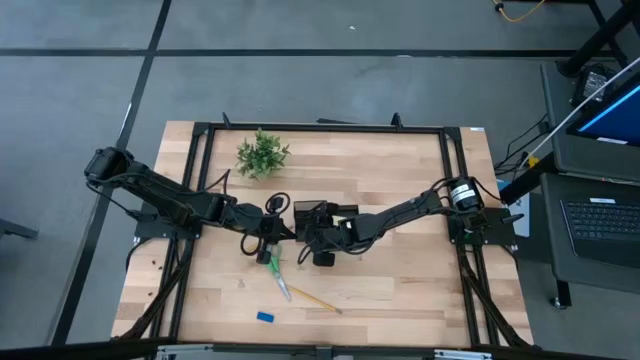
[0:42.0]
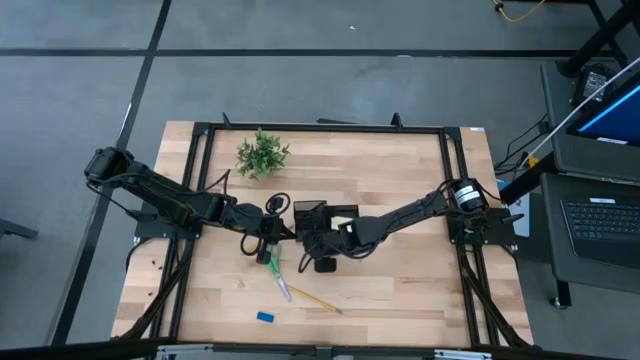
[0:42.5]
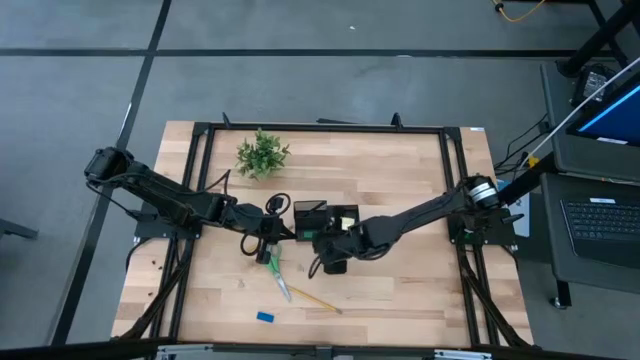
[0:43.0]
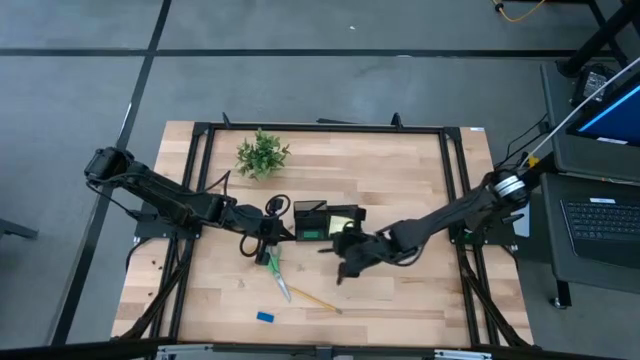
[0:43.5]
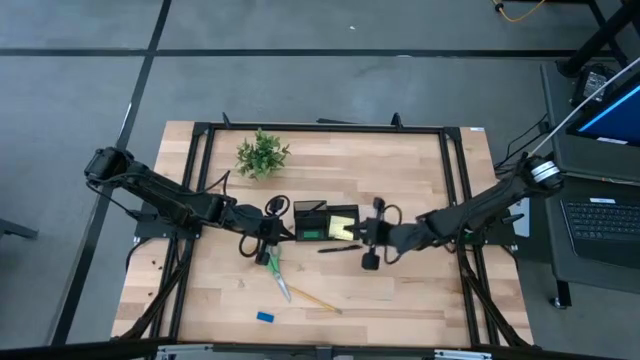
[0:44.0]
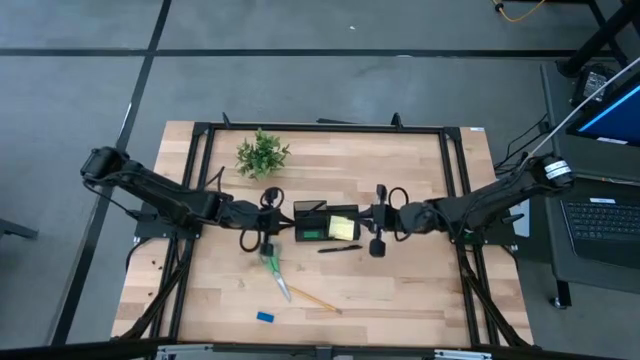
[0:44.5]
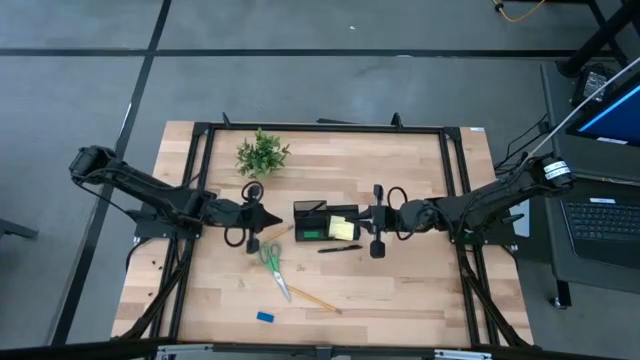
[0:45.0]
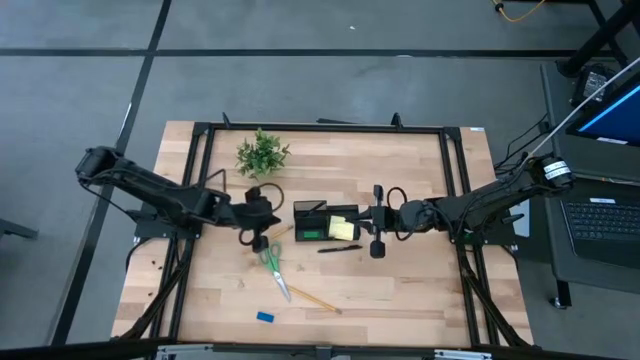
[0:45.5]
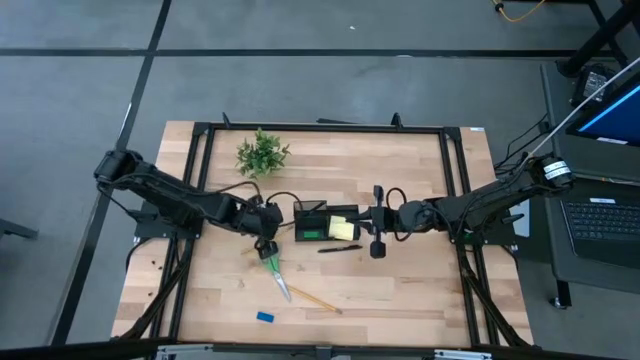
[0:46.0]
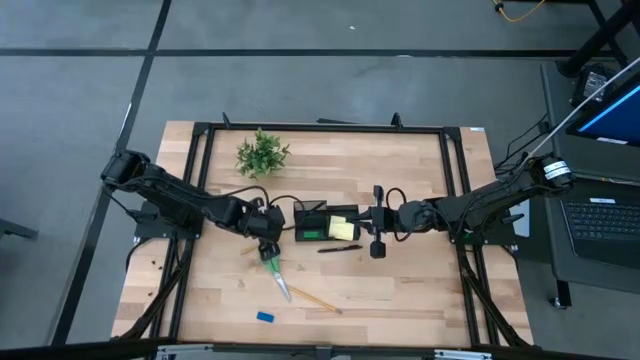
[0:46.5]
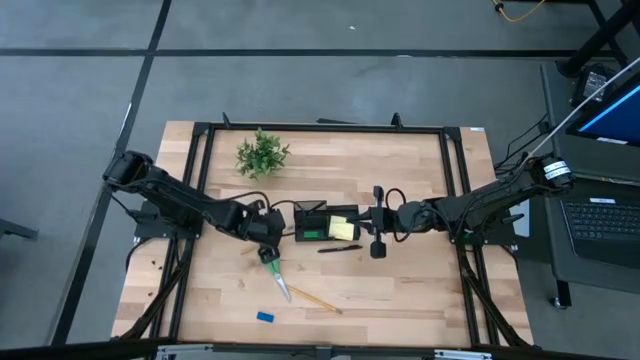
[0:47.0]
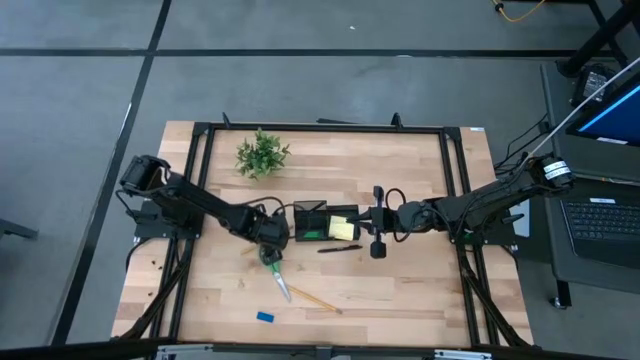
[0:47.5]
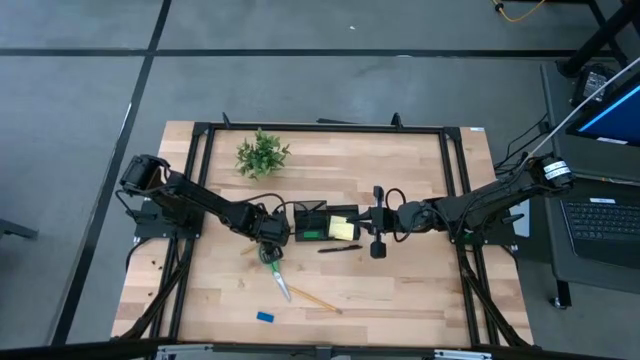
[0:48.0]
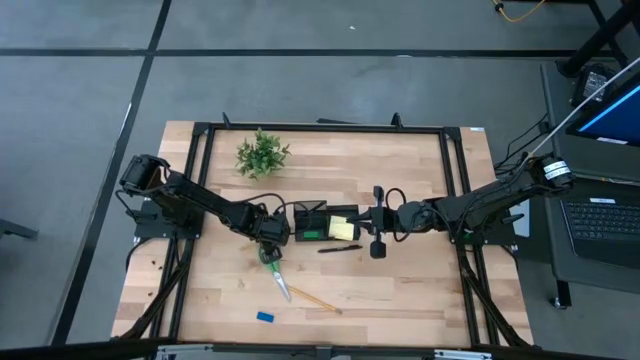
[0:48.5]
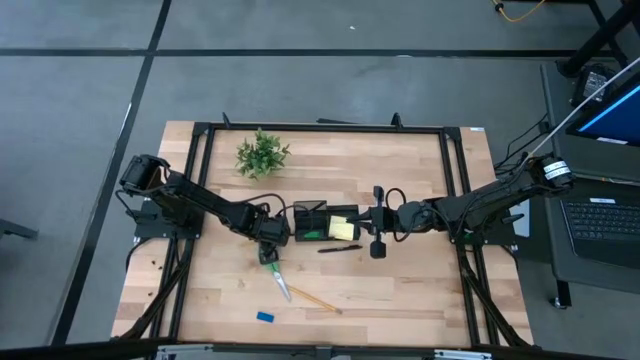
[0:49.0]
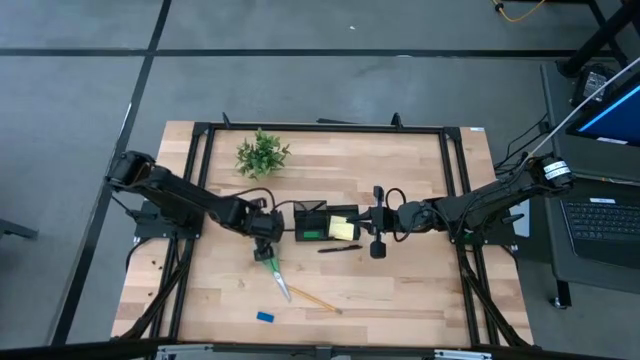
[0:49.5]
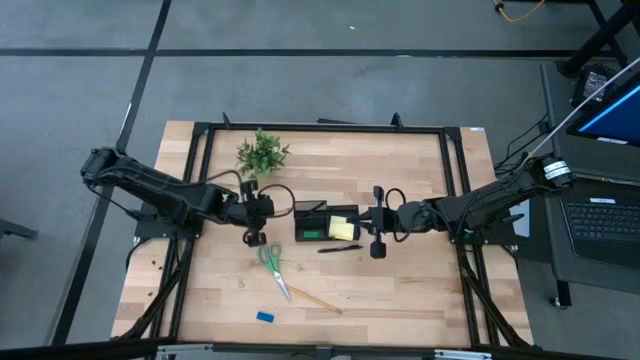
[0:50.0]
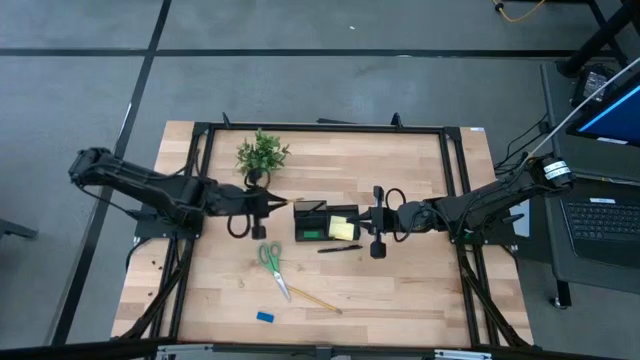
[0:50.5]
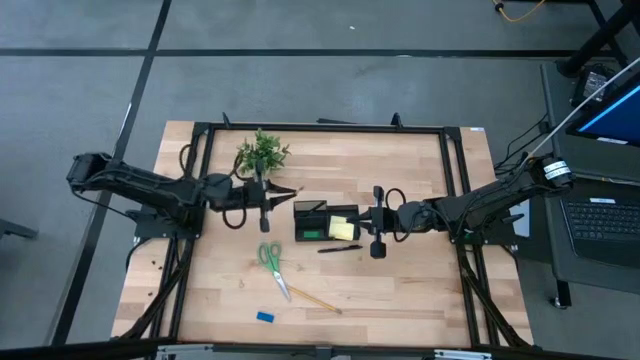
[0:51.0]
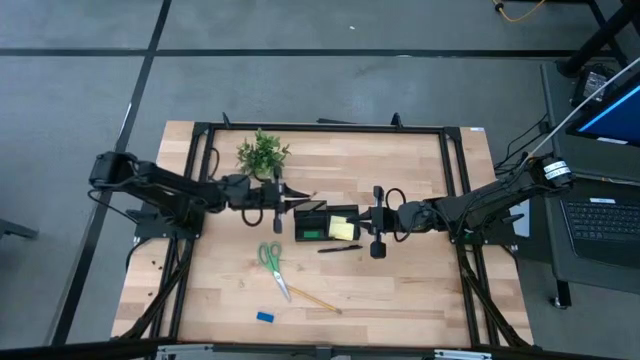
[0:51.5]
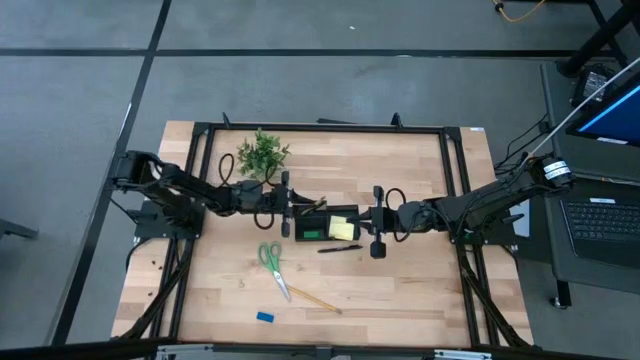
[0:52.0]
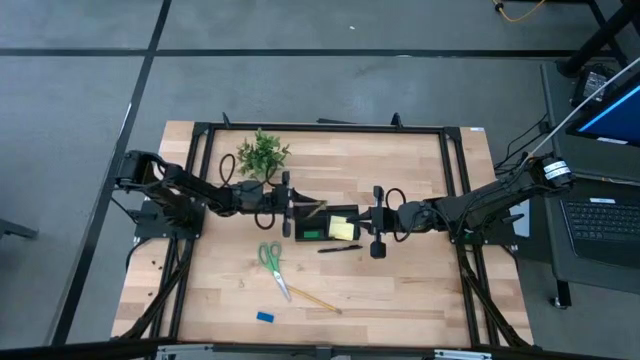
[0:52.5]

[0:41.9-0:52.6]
Task: Pick and place office supplies into organizer
Put the top yellow pencil into the black desk organizer

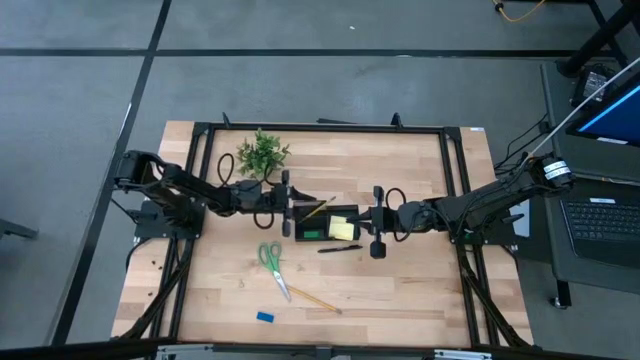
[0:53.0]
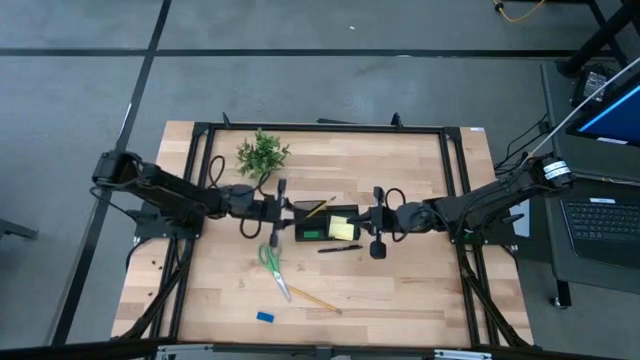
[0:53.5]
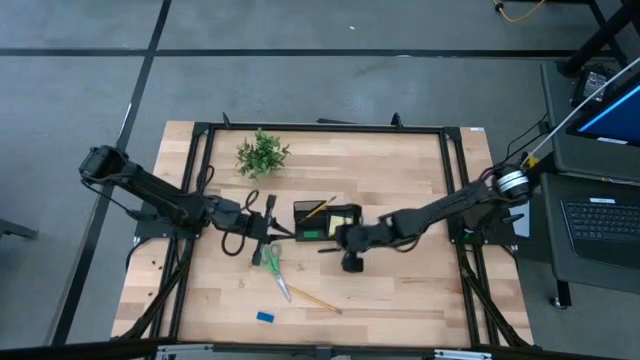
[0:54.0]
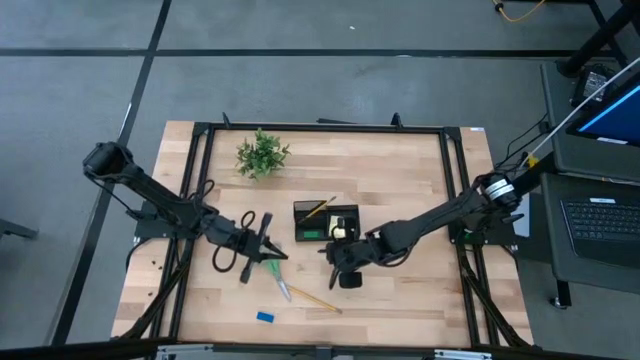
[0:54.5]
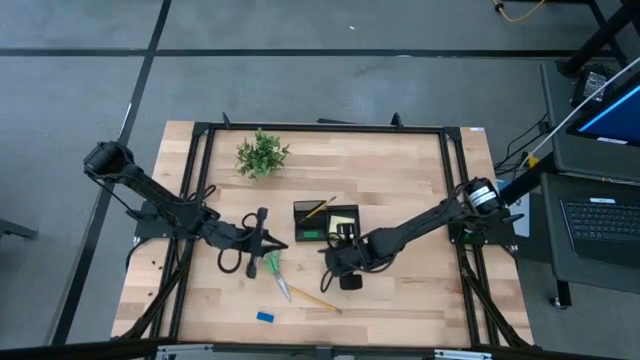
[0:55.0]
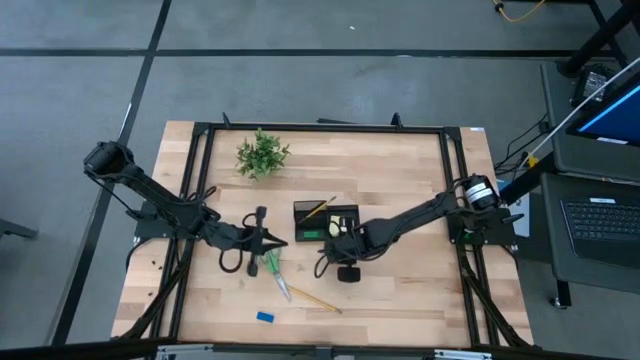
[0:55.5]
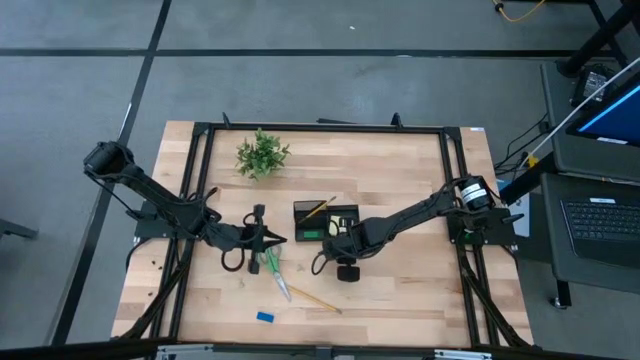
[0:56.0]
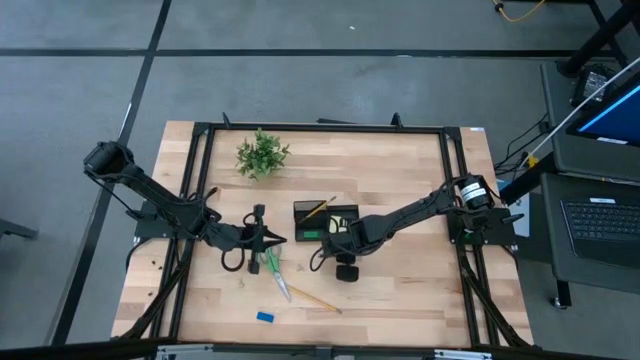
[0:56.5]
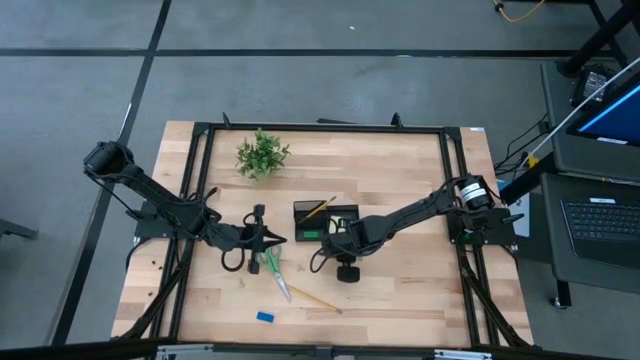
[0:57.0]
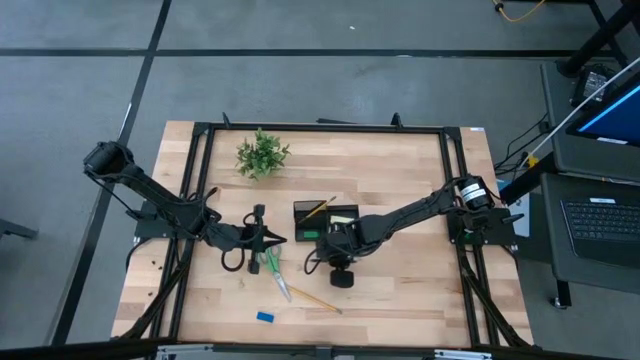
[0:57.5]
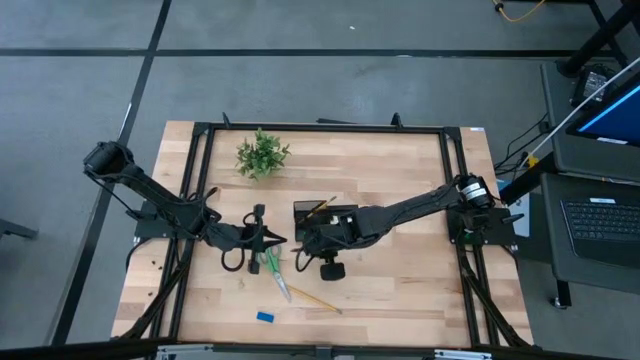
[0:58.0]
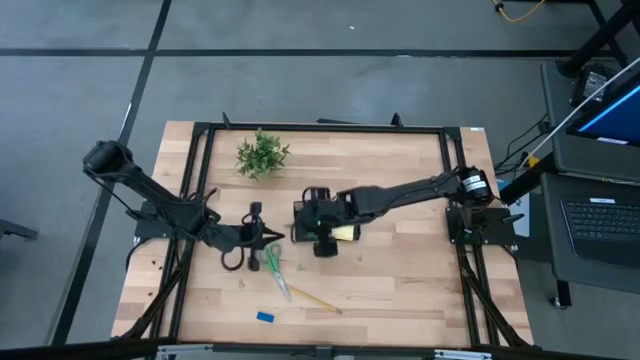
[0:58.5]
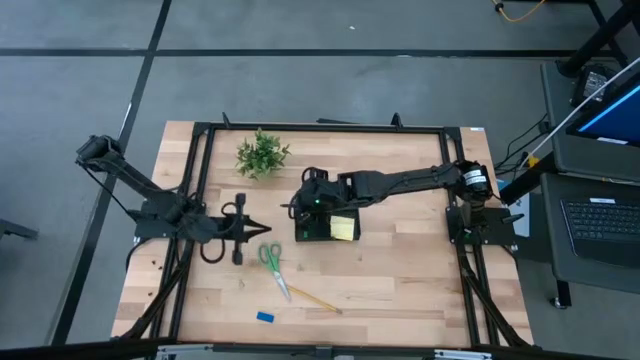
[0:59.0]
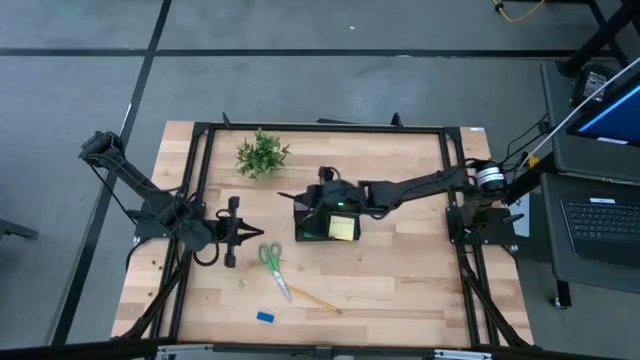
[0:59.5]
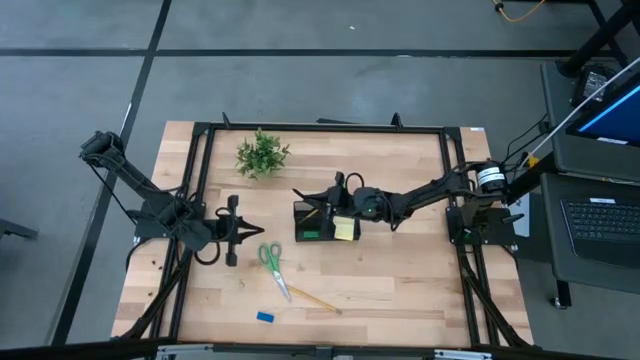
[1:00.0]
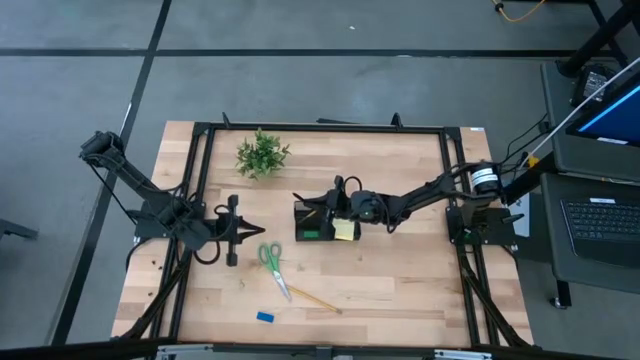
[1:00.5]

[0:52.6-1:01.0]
Put the black pen into the black desk organizer
